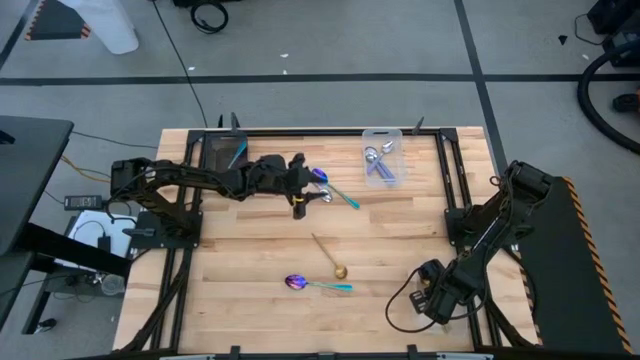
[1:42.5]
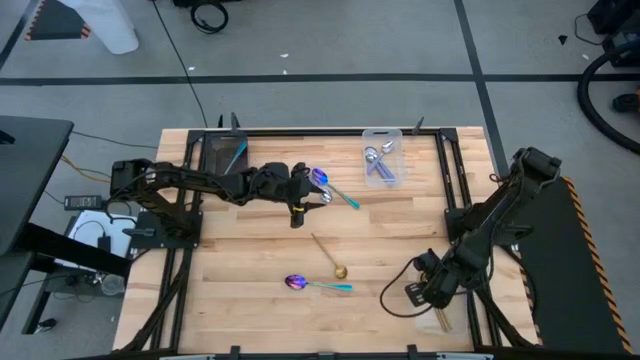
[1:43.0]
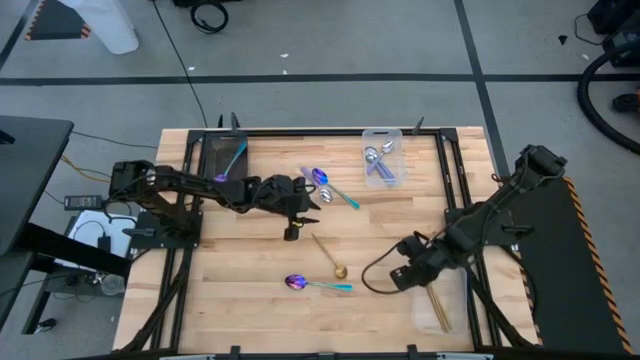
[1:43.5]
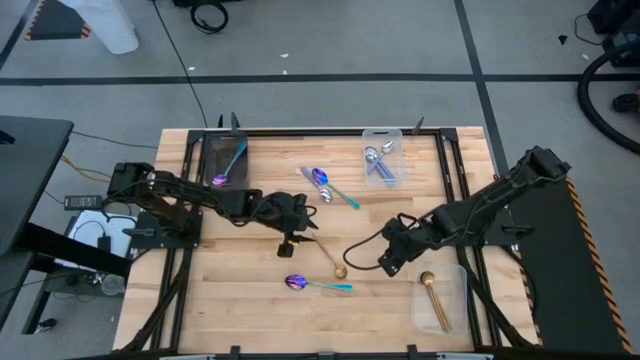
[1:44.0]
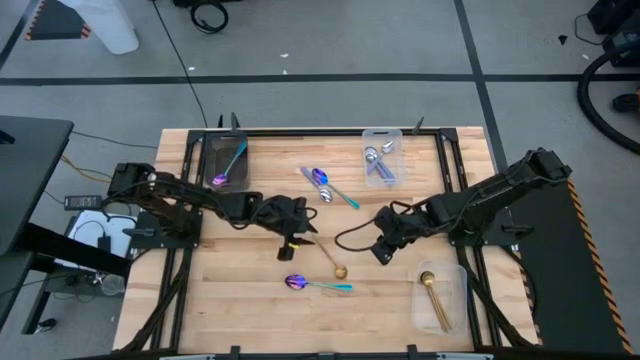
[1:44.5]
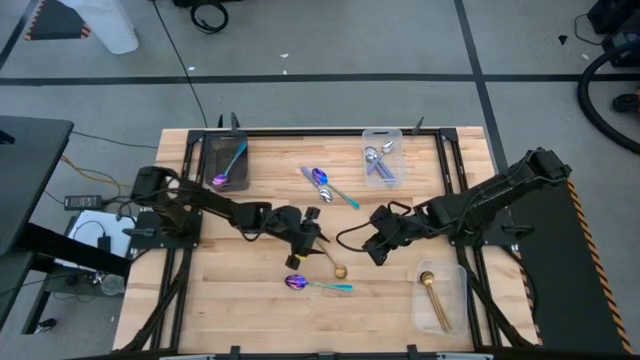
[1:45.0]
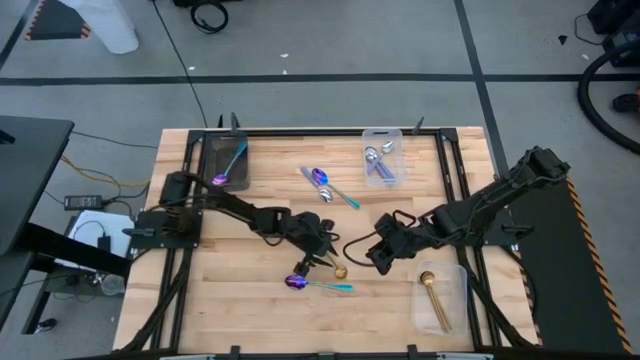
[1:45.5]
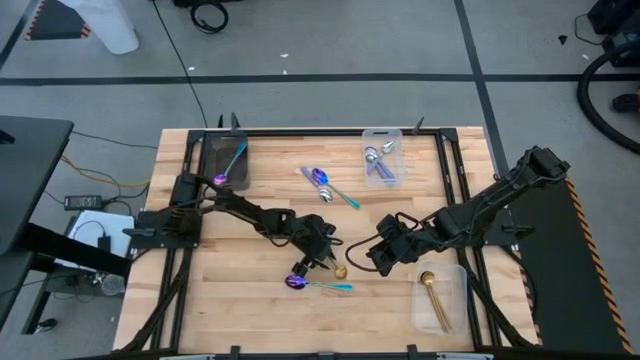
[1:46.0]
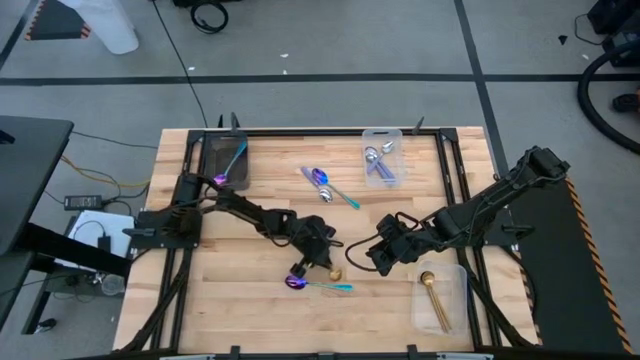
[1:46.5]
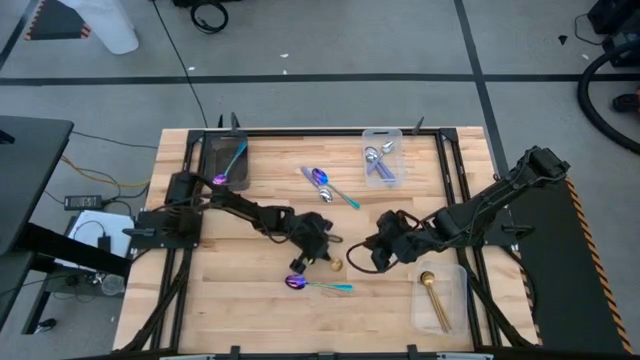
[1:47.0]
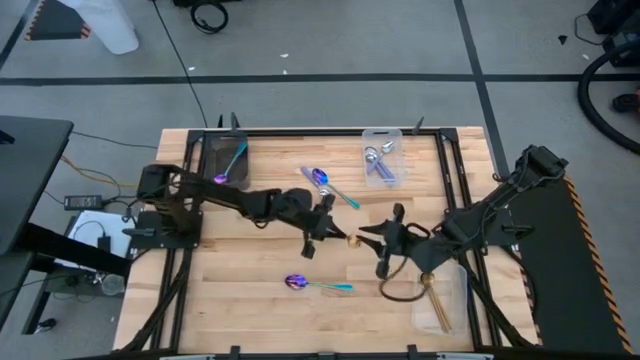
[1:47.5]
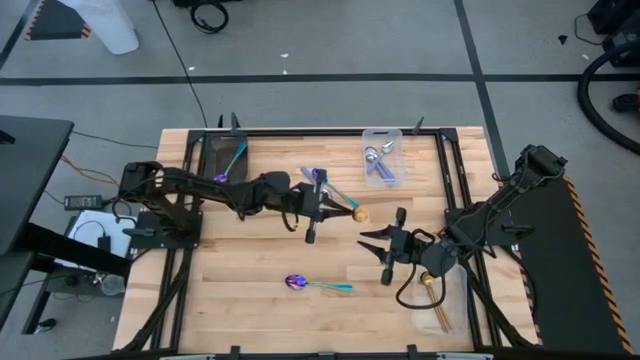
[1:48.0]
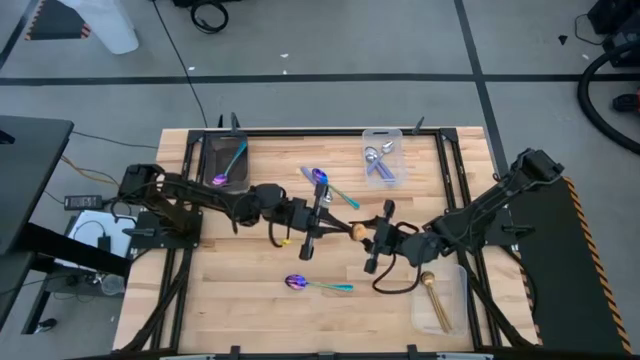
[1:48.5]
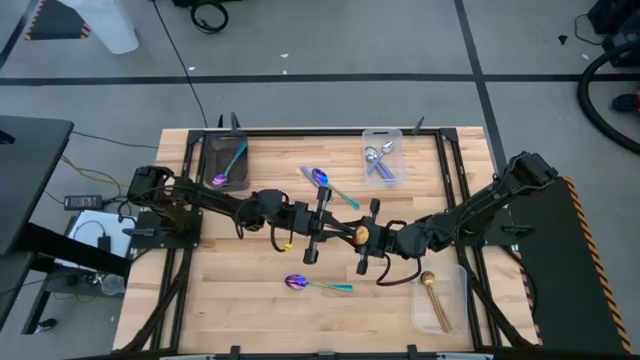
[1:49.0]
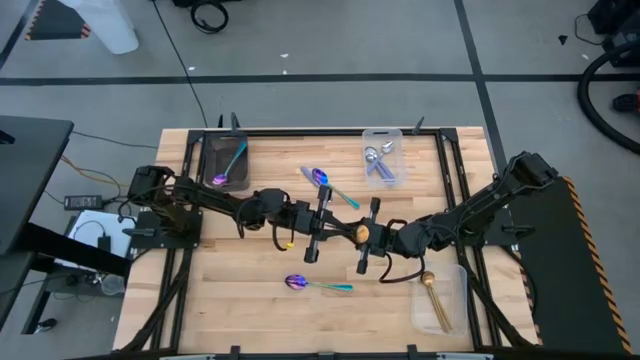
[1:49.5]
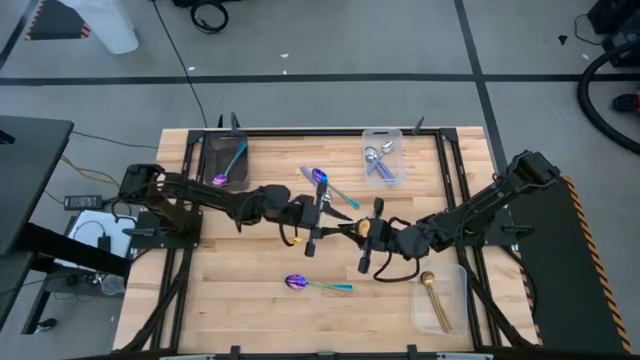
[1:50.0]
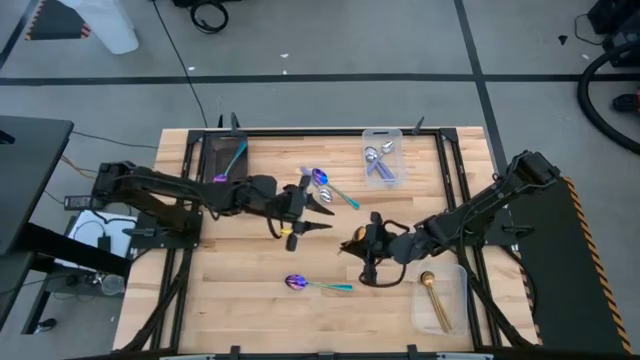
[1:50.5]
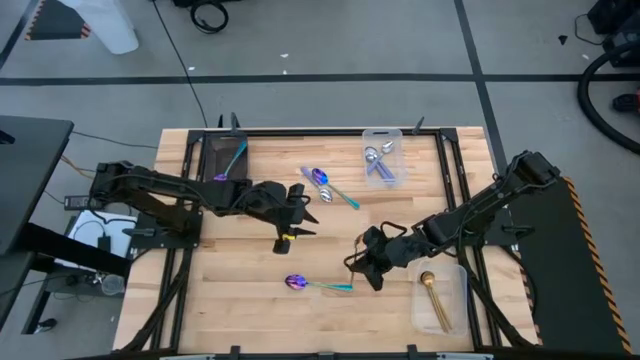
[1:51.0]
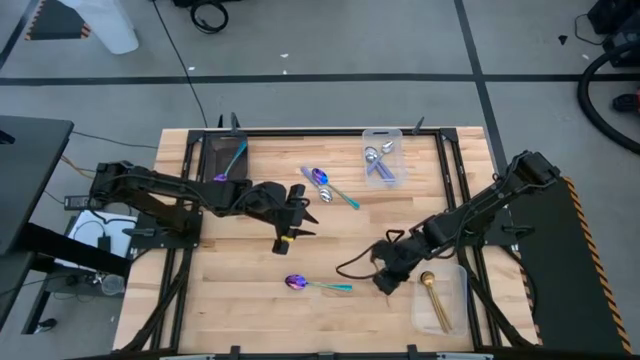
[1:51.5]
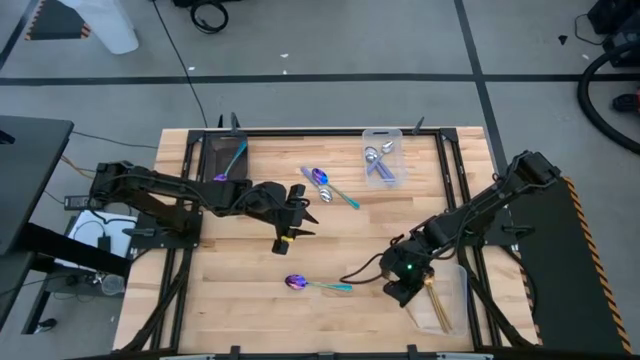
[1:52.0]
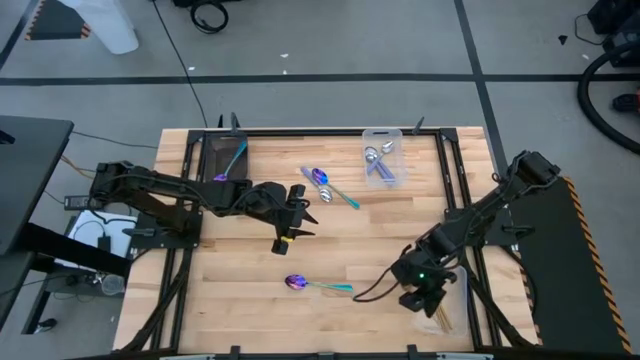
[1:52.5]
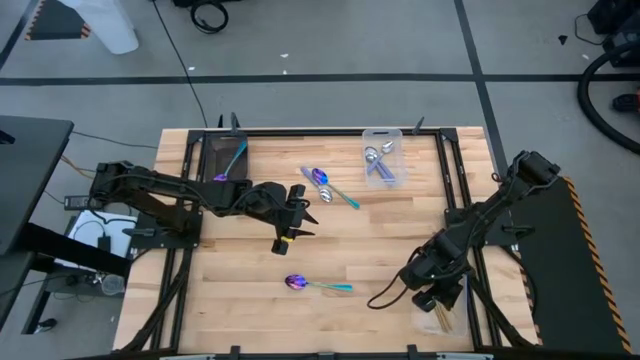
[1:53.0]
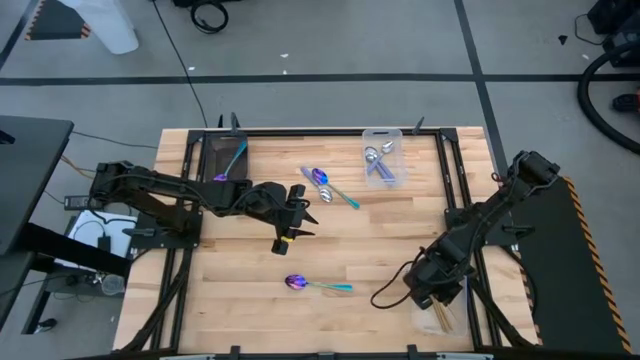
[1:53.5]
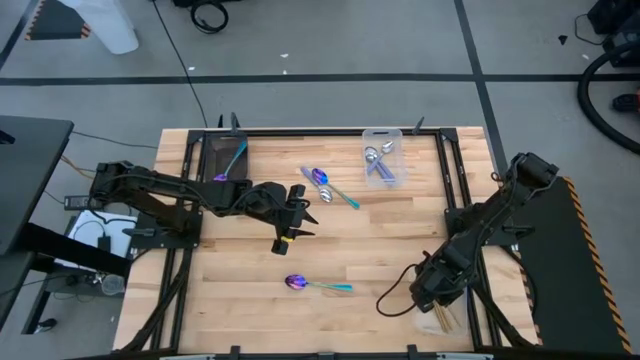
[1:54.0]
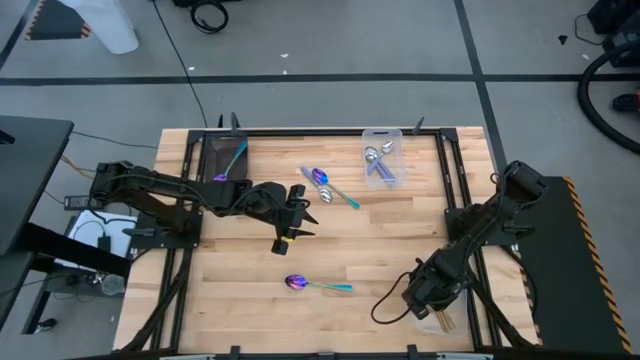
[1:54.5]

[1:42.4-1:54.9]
Task: Sort silverware by color (type)
Put the gold spoon into the bottom transparent bin

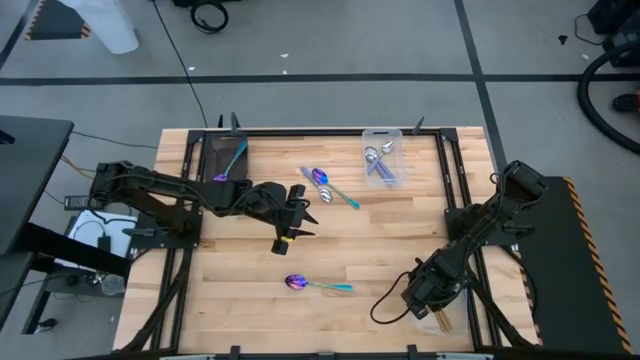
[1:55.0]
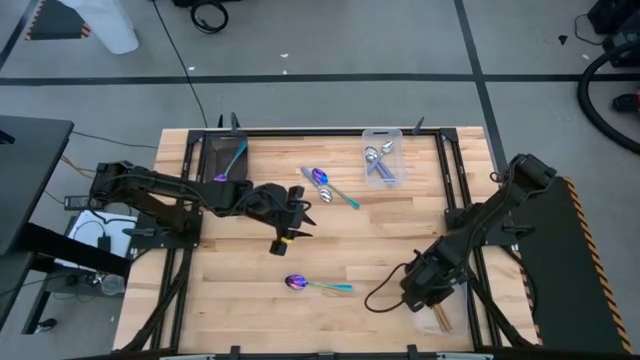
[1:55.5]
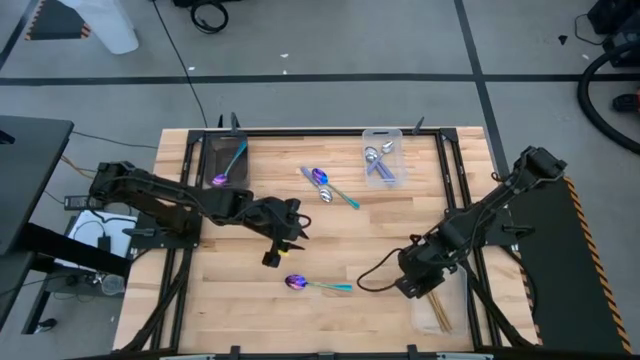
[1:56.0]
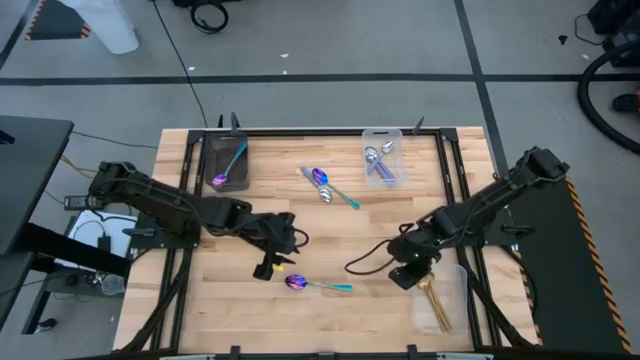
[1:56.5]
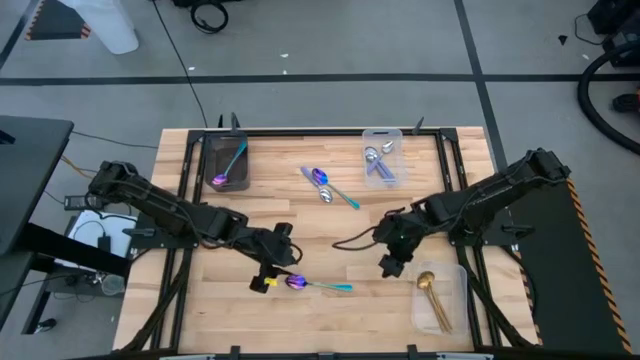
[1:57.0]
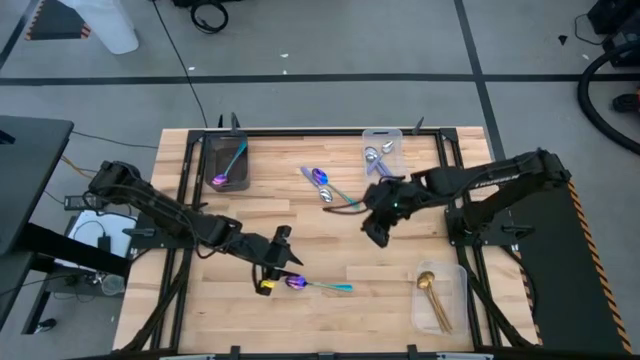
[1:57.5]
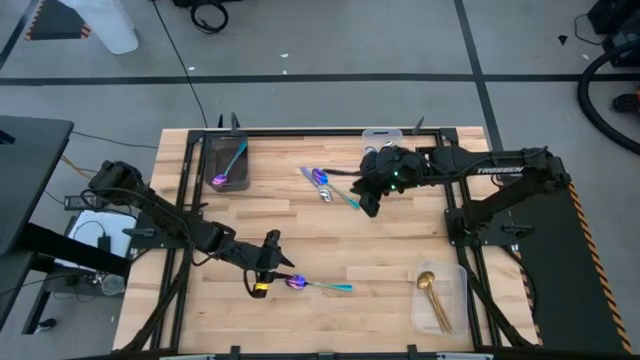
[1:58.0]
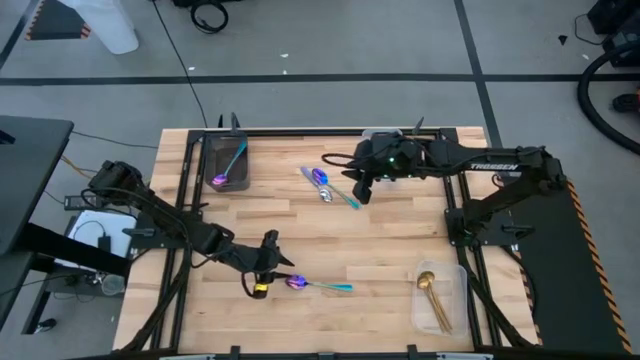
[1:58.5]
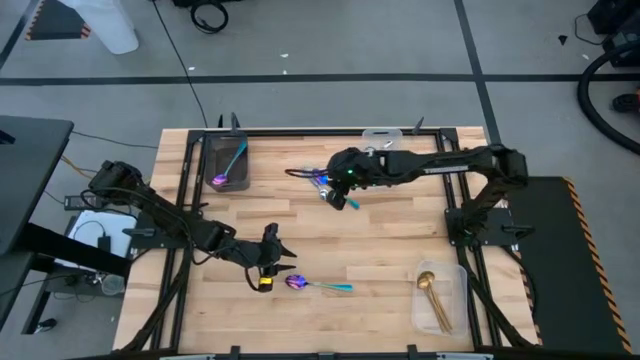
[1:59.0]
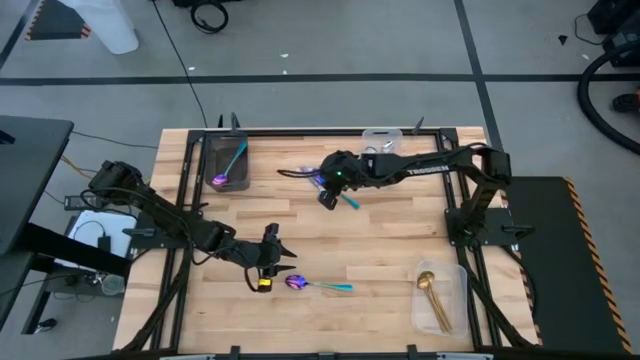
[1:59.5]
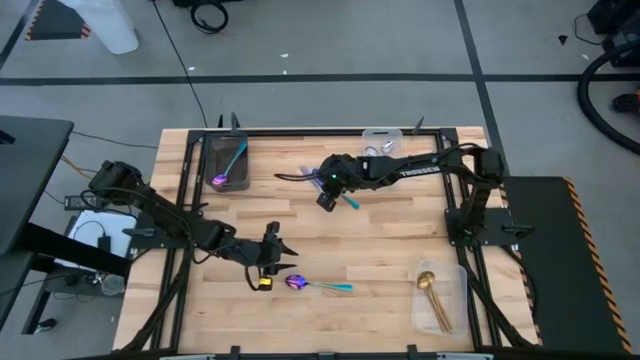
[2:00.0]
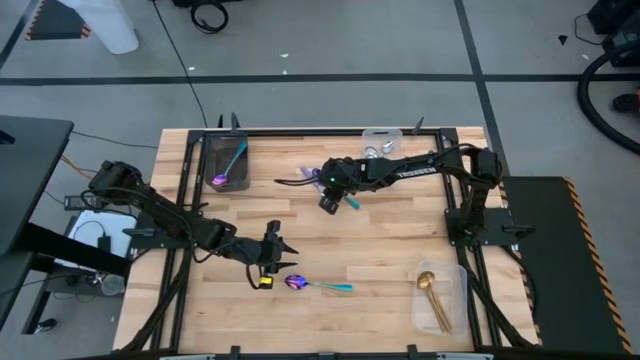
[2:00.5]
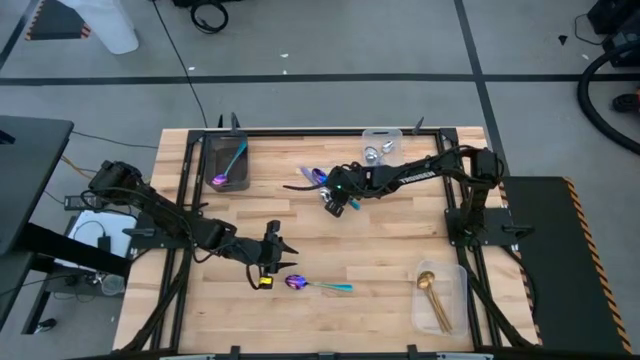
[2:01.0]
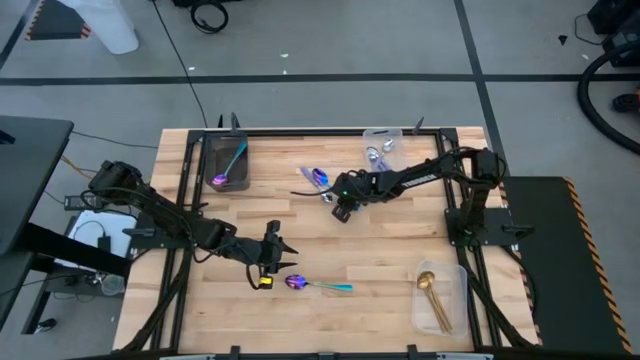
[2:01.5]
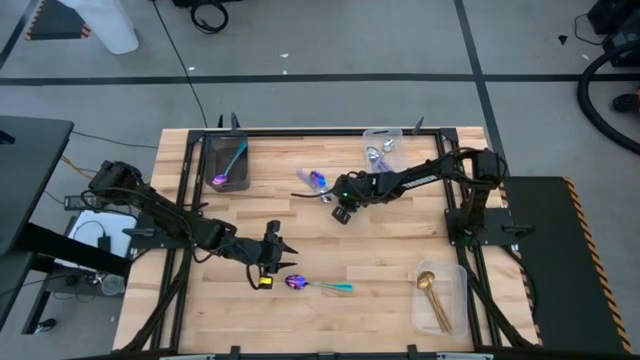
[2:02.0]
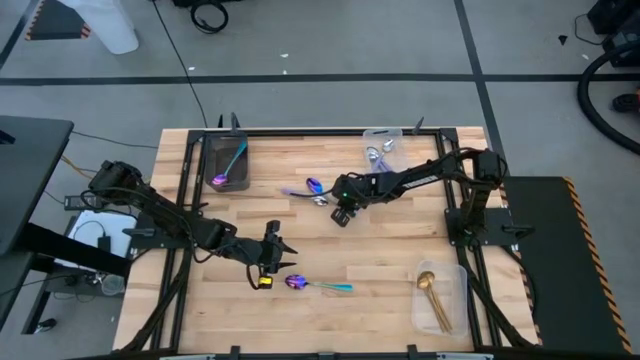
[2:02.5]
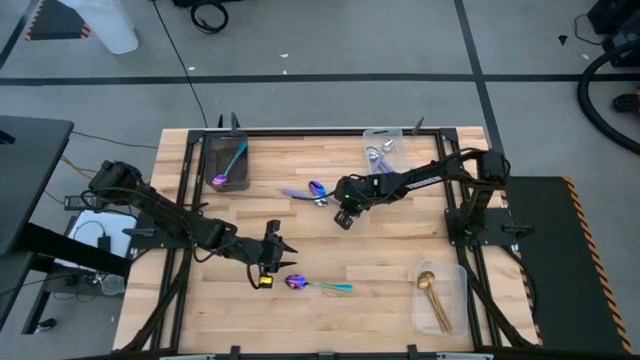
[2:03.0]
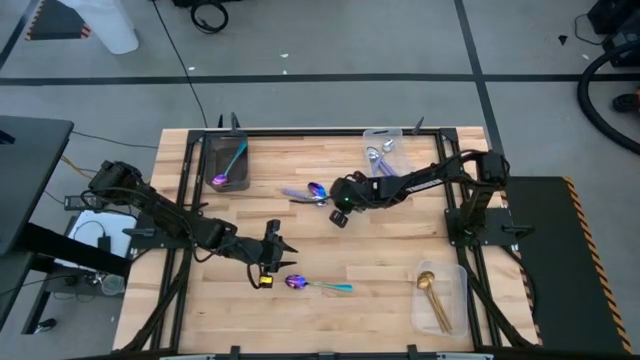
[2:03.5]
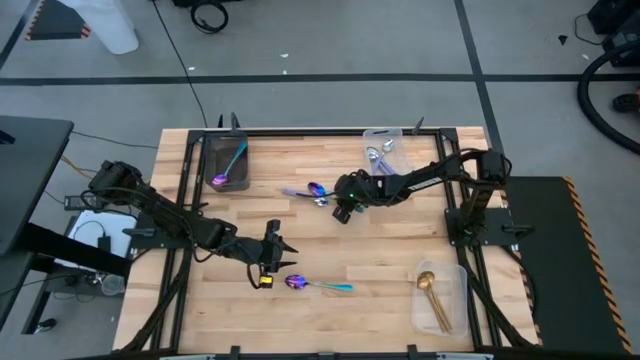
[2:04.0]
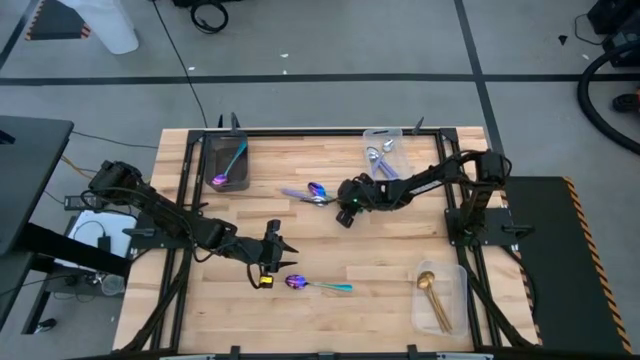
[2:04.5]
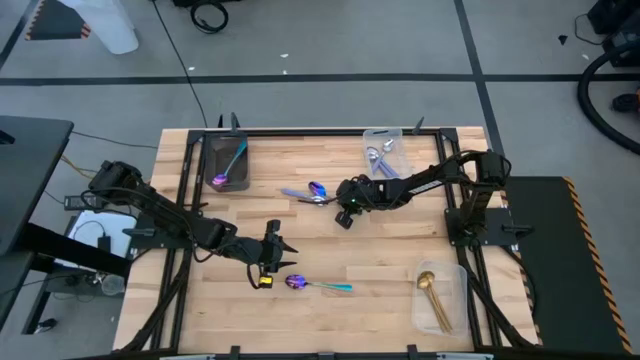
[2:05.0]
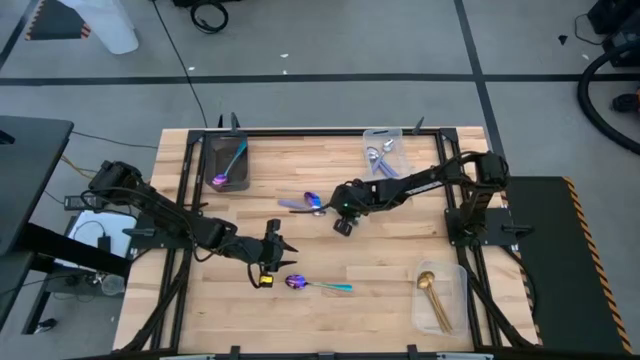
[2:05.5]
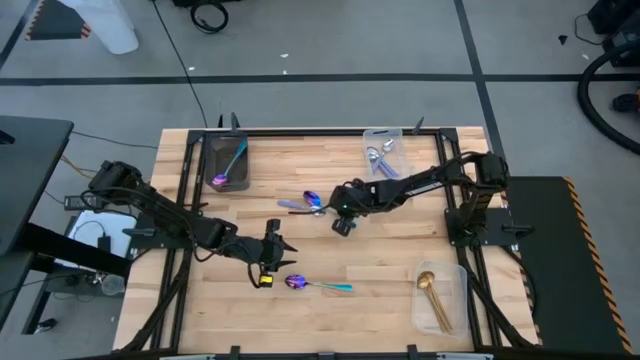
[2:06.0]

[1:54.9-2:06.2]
Put the blue spoon into the black bin
